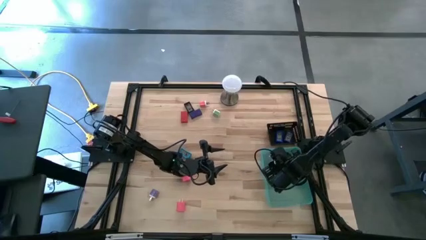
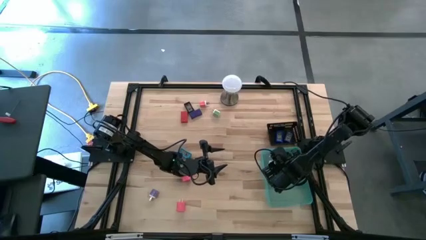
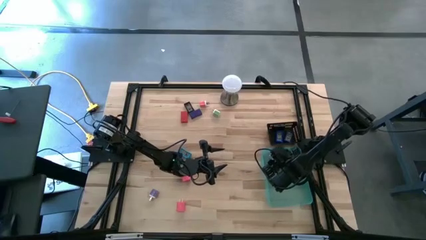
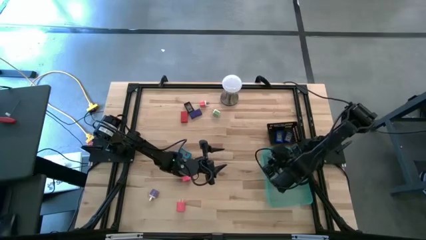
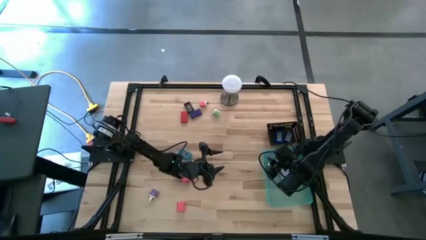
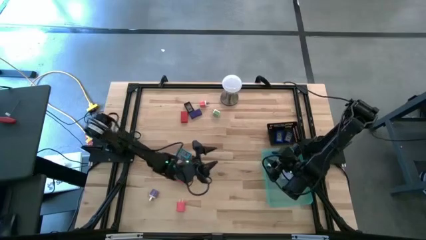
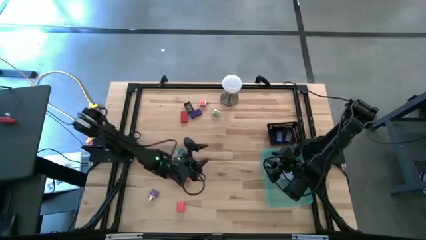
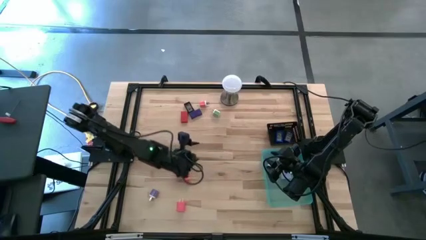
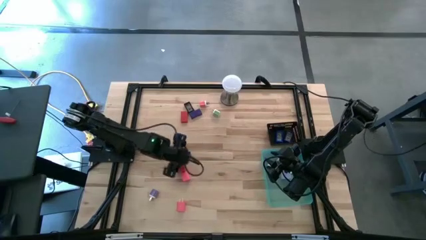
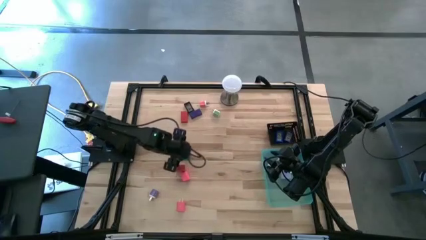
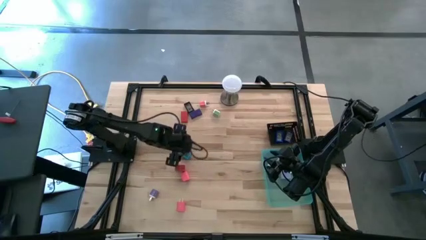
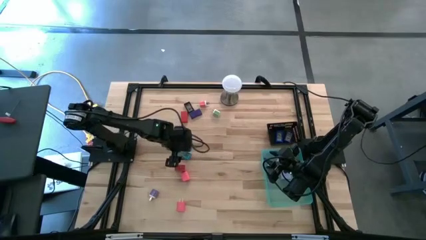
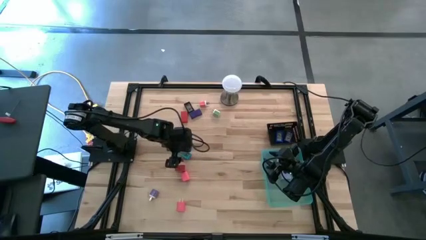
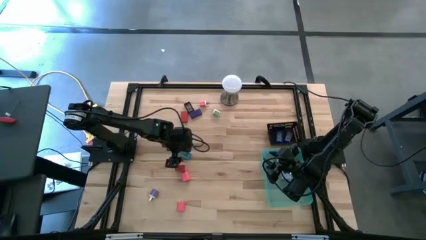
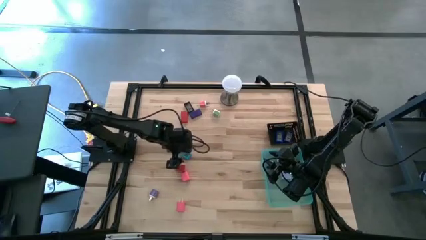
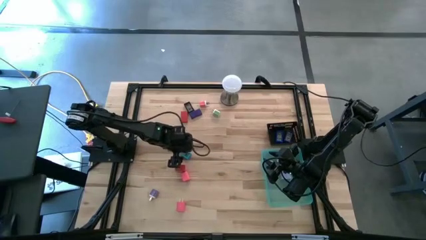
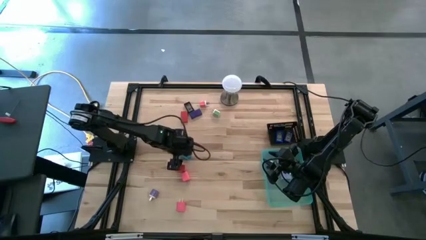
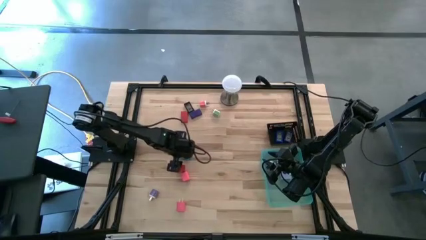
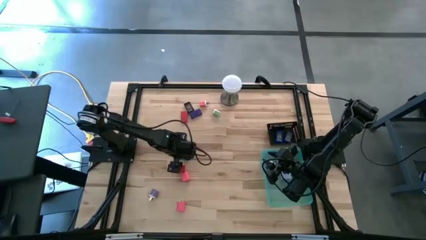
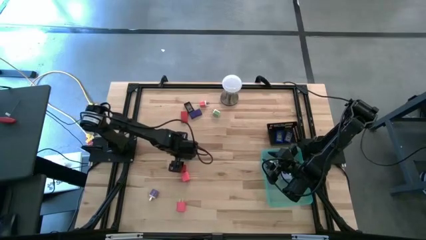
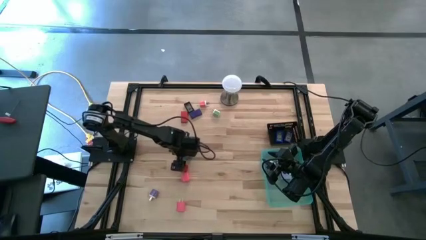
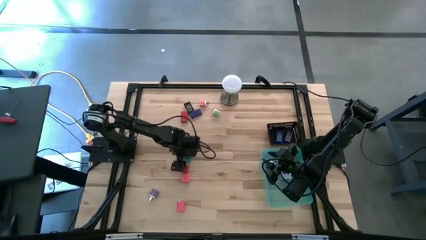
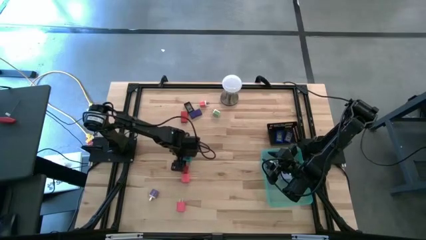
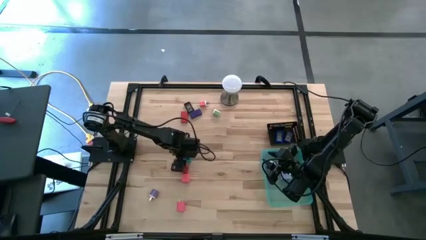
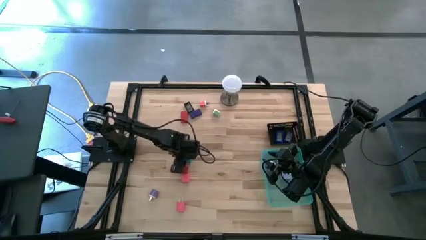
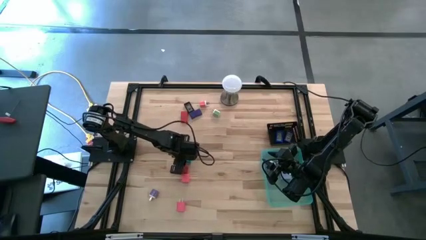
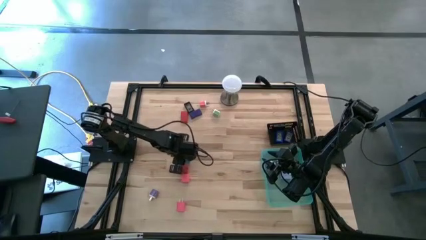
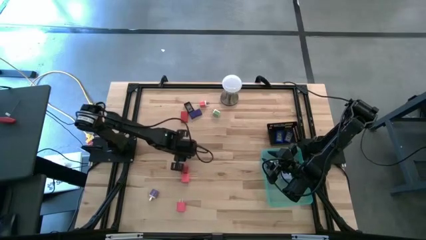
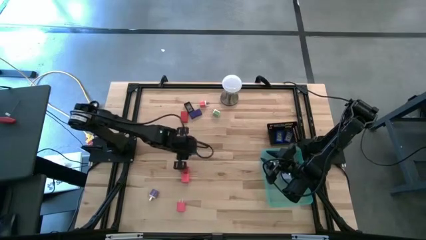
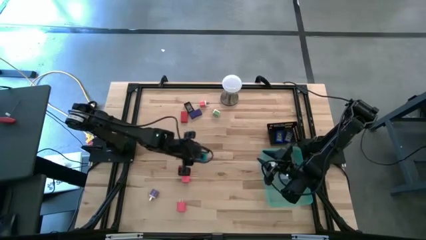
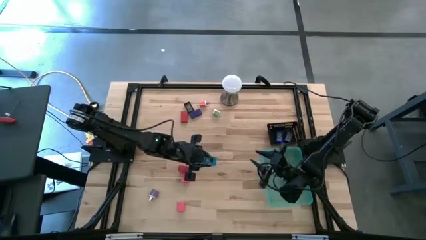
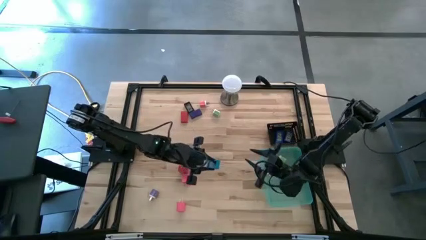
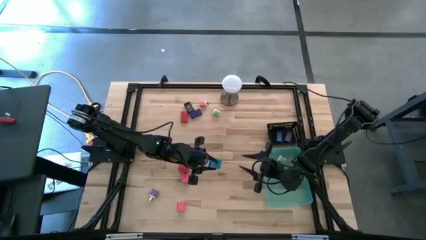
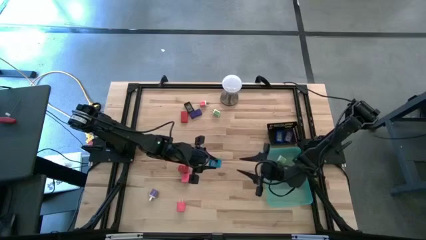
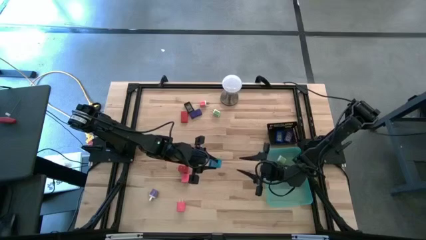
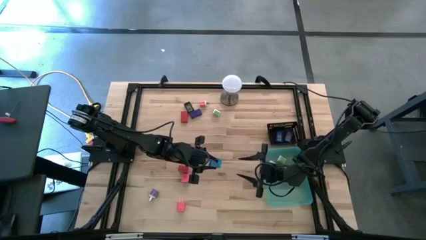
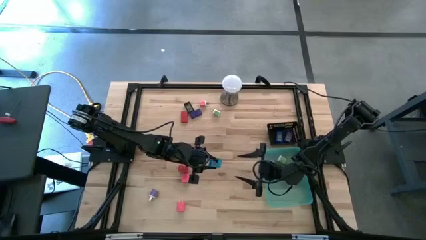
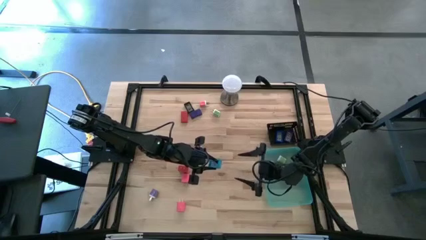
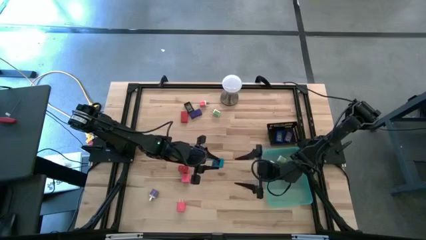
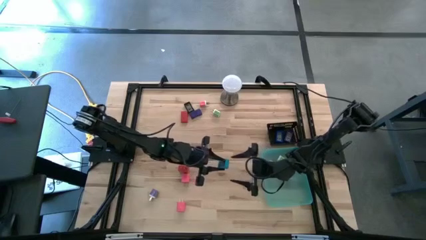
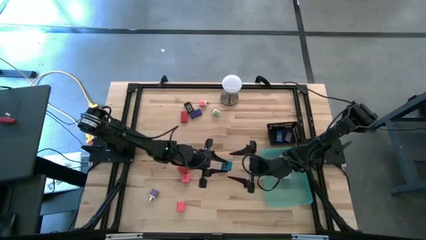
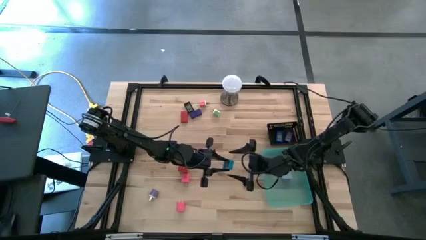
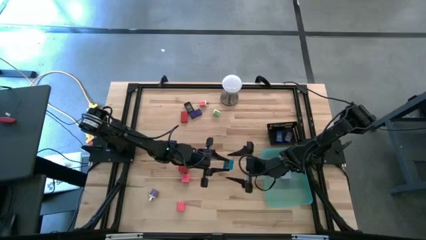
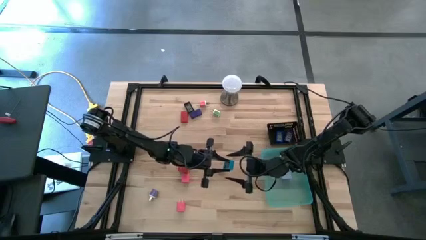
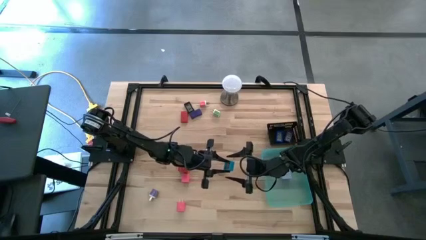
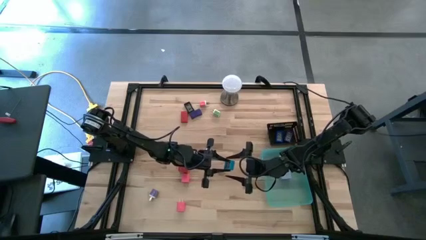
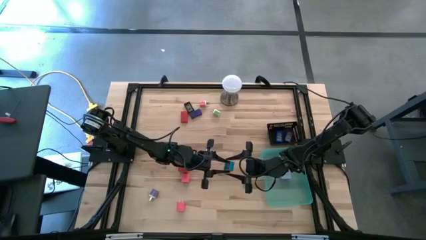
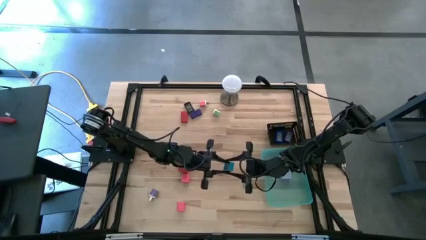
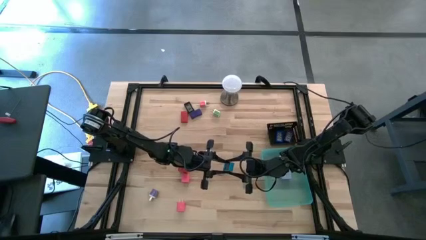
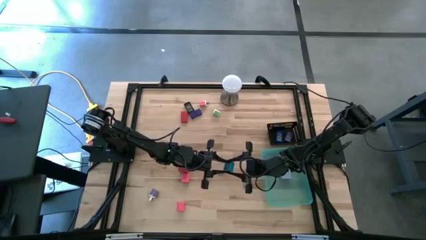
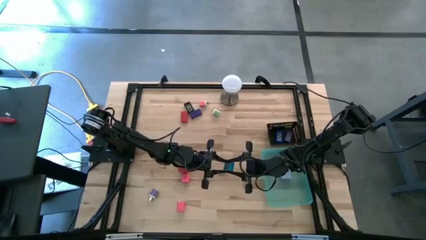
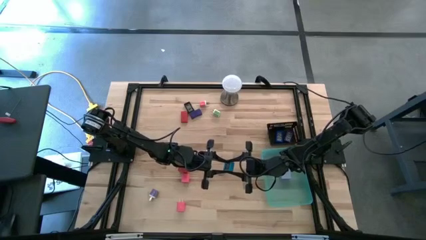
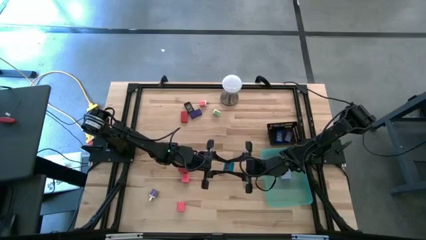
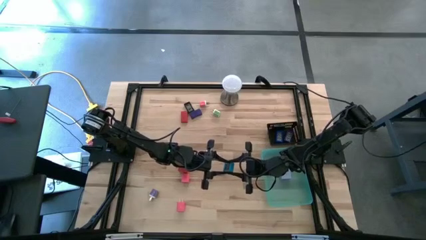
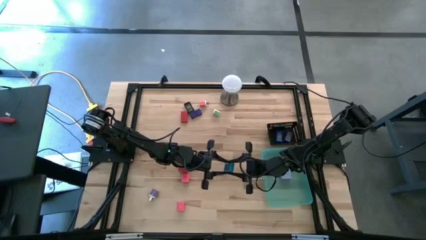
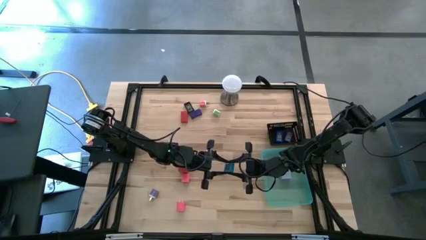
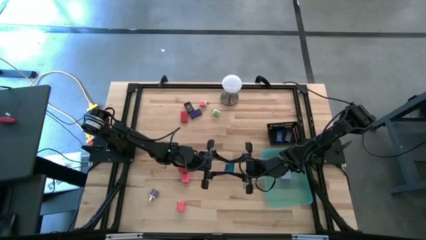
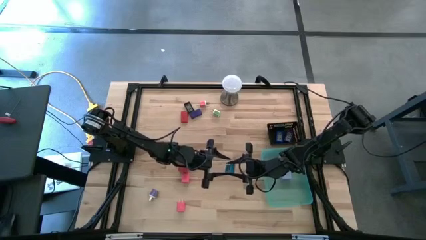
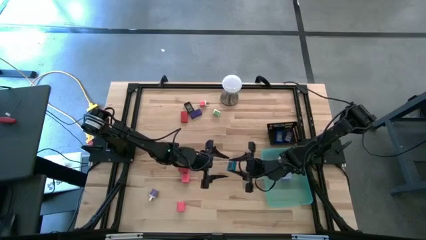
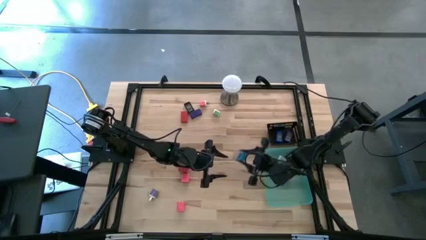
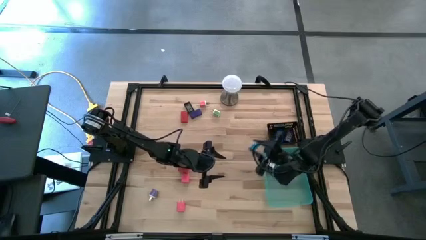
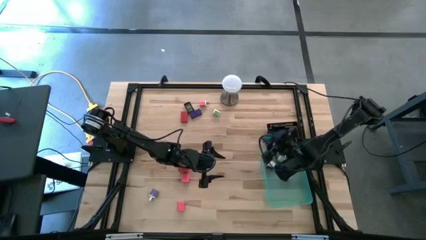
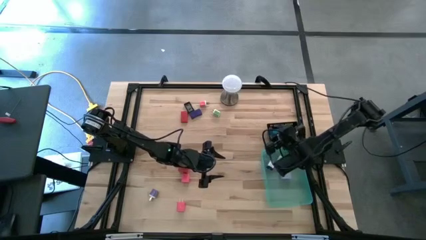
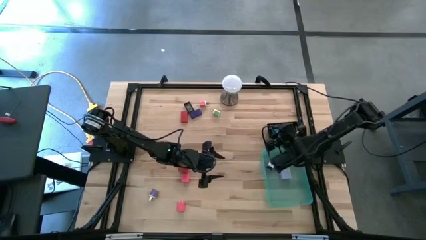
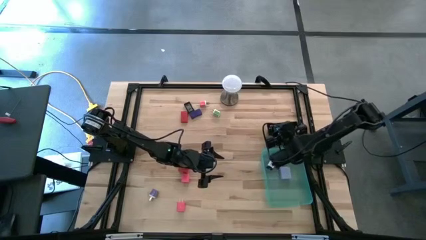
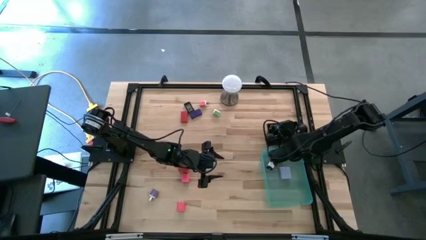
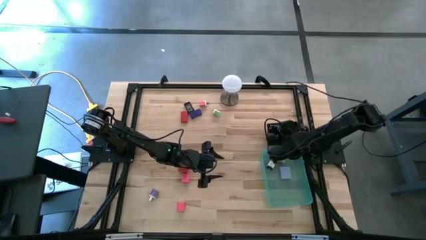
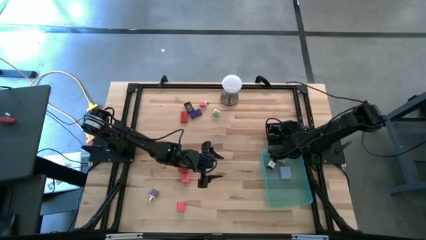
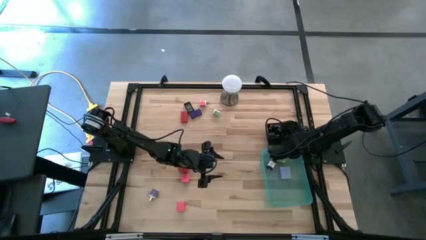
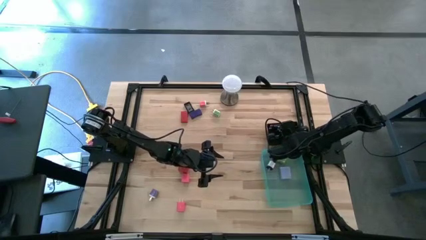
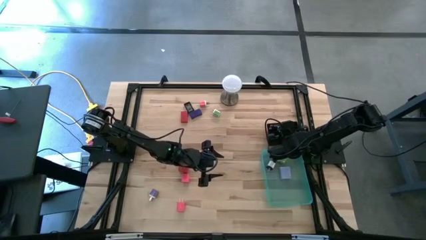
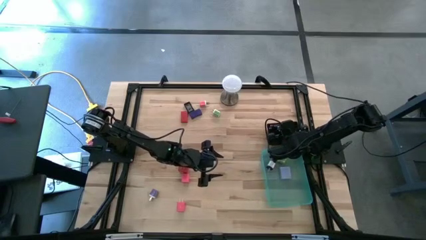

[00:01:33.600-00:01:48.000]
Task: Pick & Place Office items
Put the light blue charger adapter into the green bin

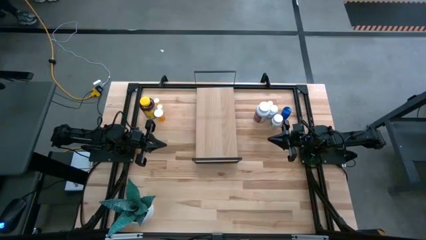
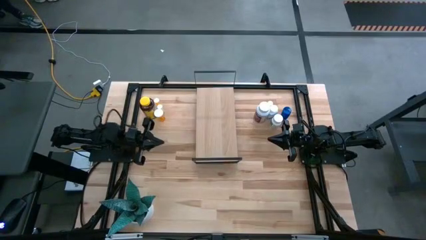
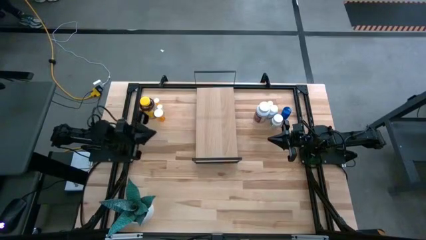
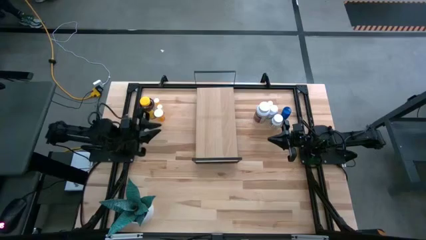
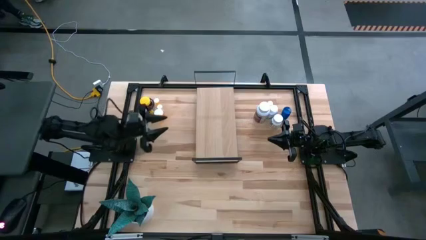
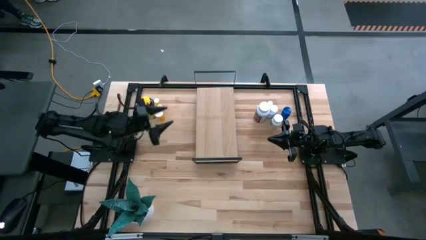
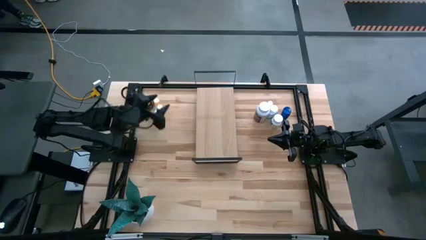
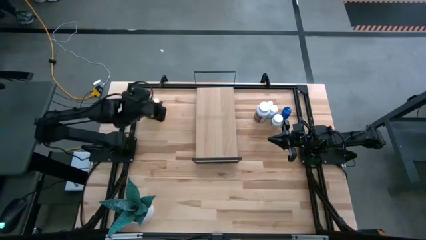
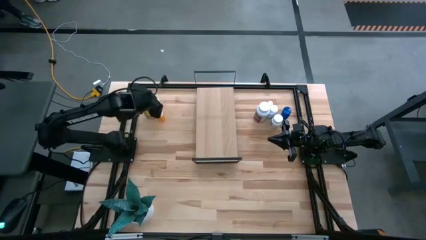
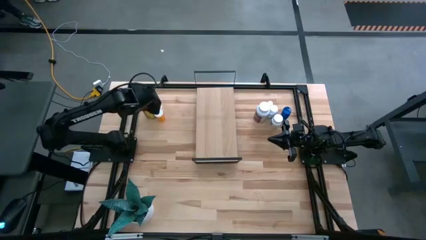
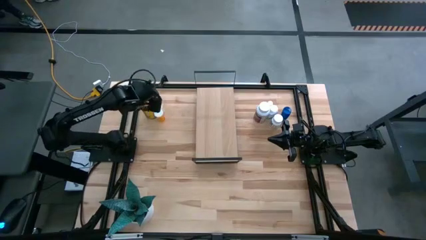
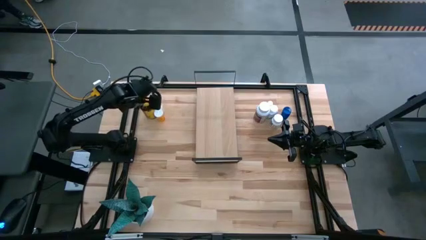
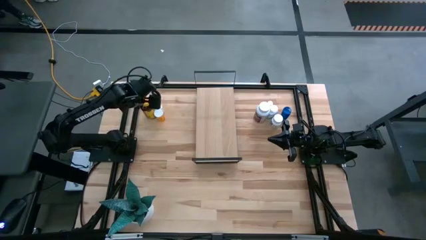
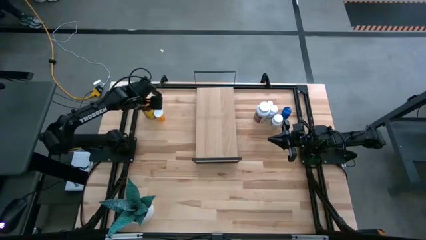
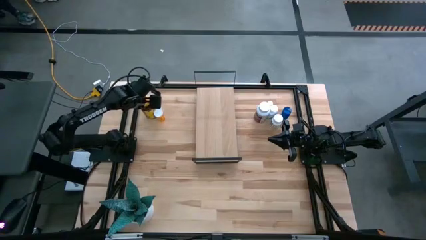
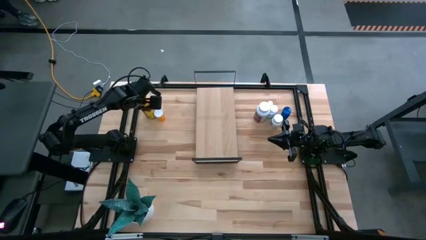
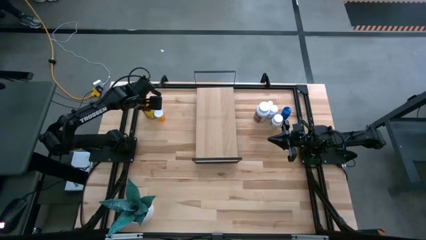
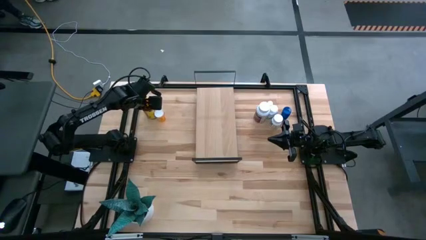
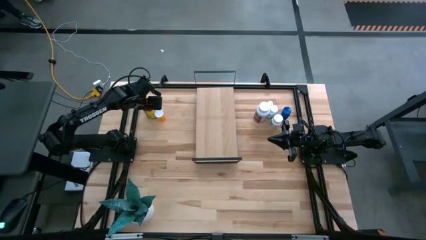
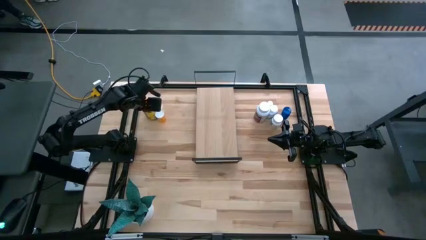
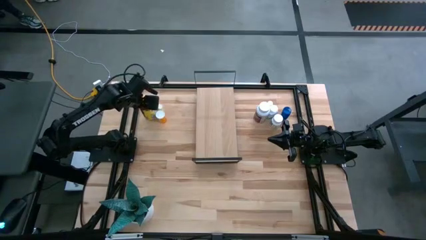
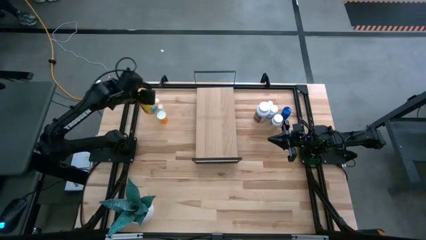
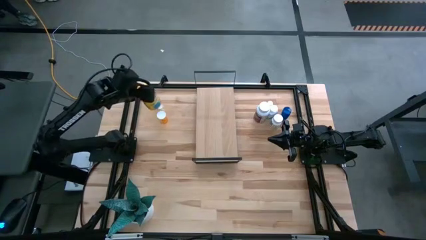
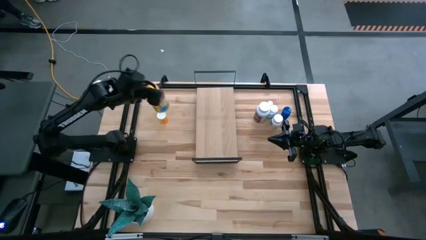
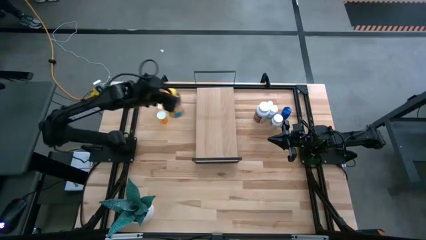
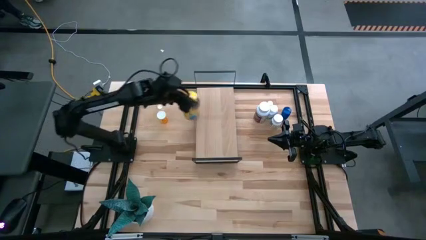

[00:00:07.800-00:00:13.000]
Task: Pick and place medicine bottles onto shelf by color
Put the big yellow medicine bottle on the shelf
